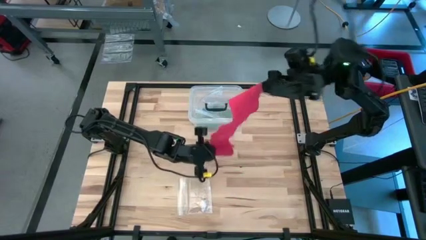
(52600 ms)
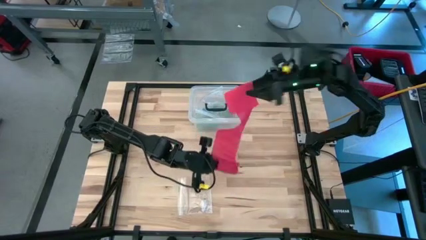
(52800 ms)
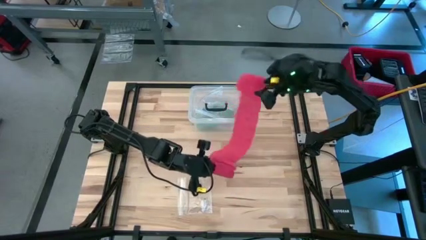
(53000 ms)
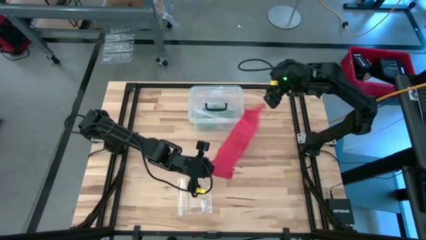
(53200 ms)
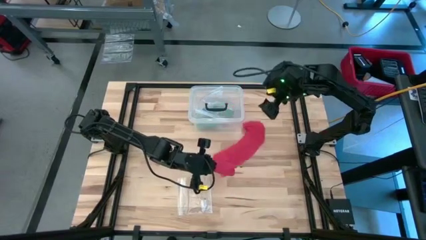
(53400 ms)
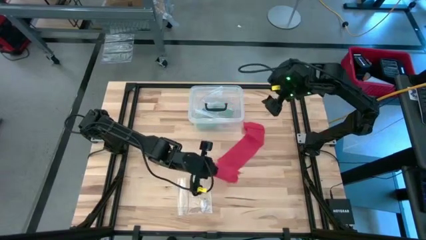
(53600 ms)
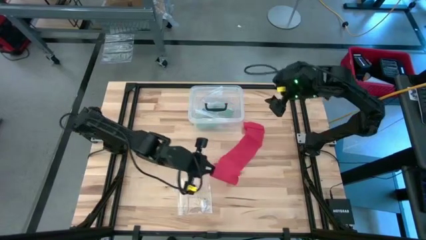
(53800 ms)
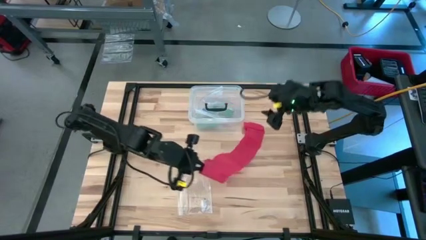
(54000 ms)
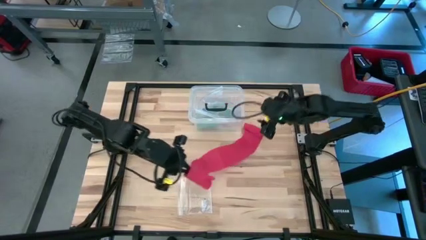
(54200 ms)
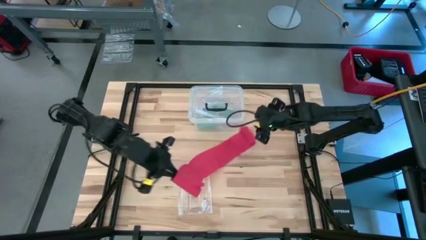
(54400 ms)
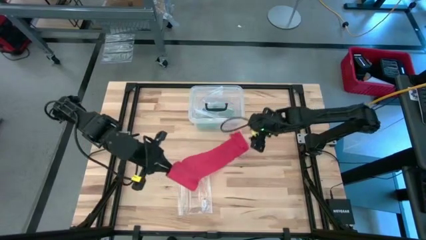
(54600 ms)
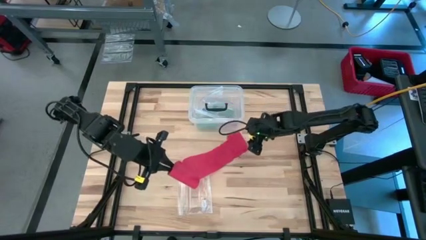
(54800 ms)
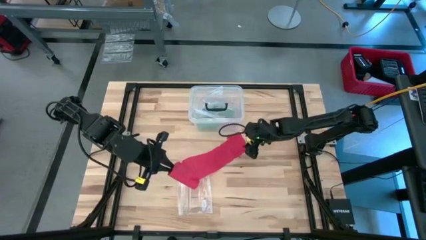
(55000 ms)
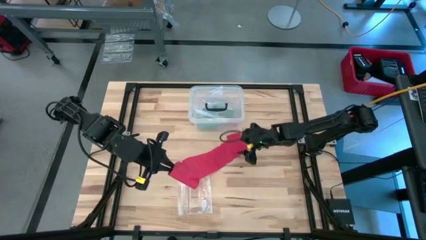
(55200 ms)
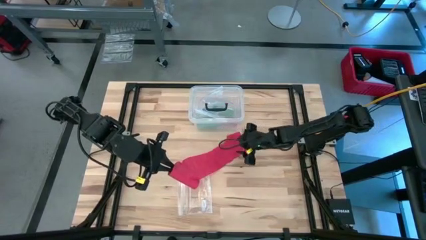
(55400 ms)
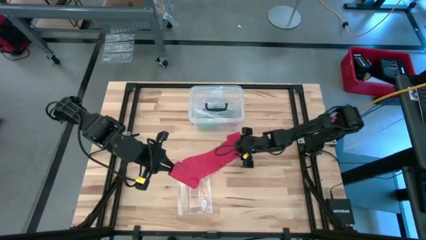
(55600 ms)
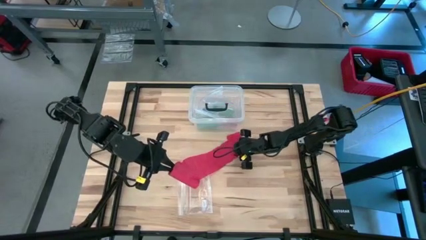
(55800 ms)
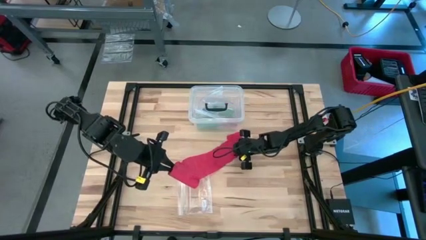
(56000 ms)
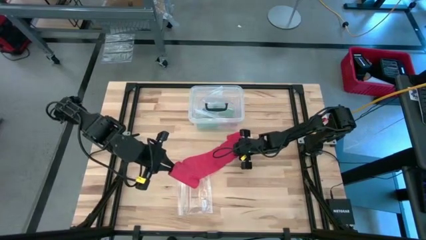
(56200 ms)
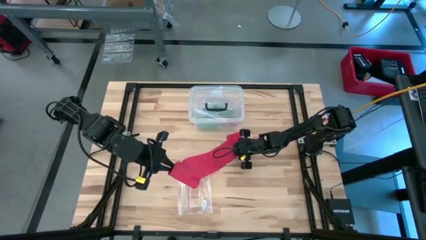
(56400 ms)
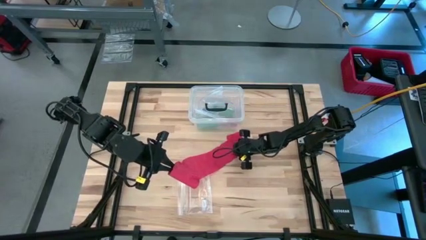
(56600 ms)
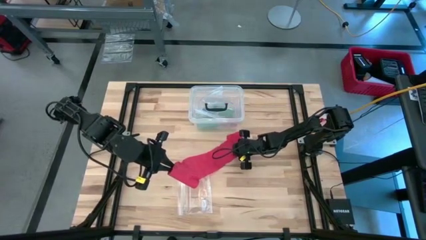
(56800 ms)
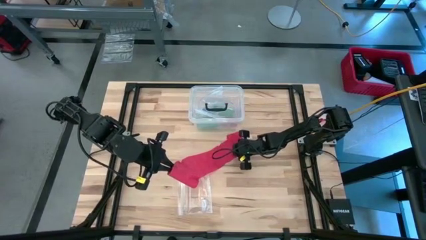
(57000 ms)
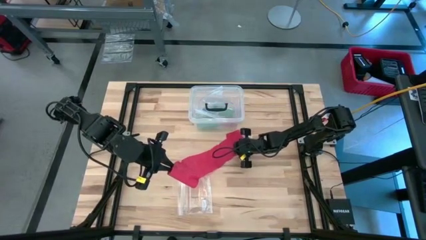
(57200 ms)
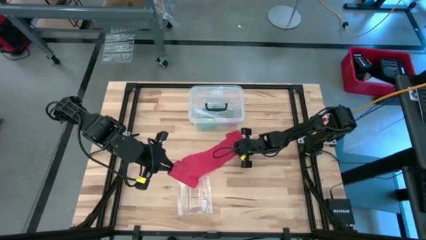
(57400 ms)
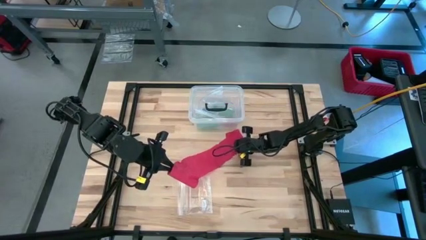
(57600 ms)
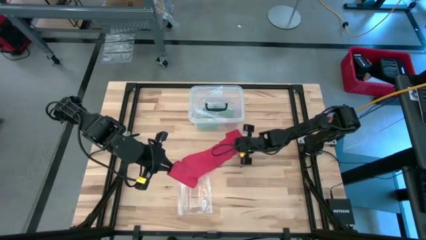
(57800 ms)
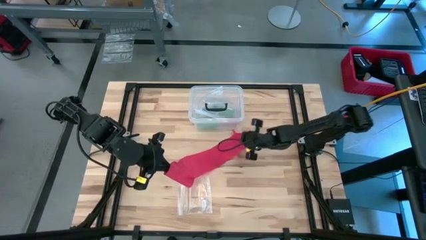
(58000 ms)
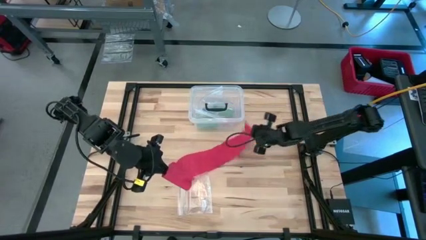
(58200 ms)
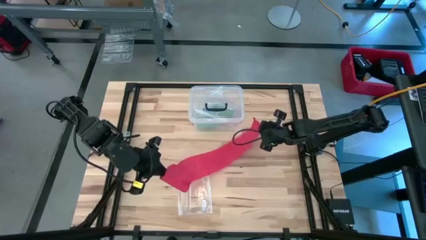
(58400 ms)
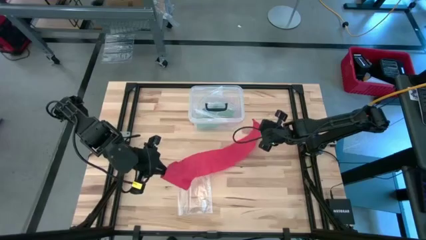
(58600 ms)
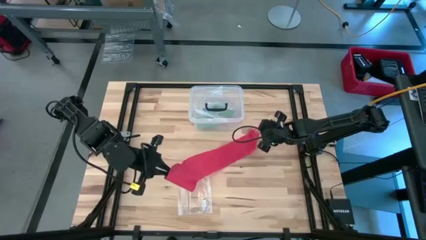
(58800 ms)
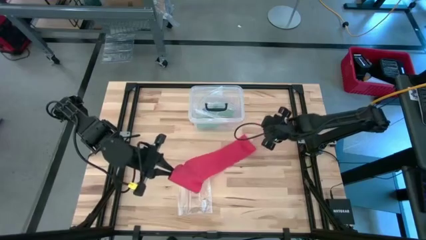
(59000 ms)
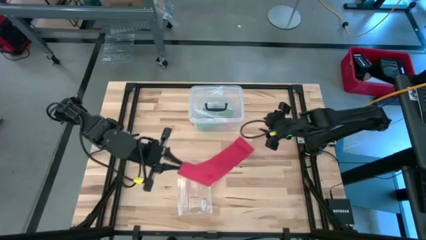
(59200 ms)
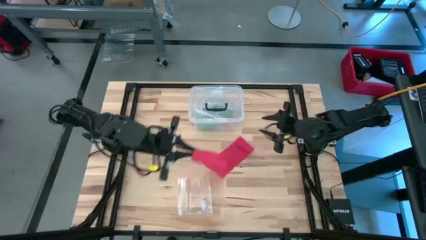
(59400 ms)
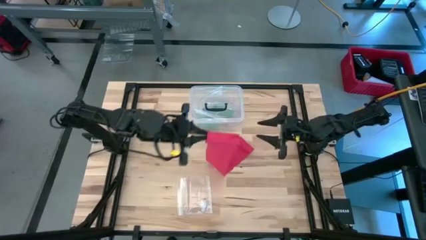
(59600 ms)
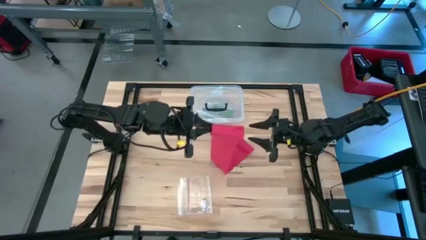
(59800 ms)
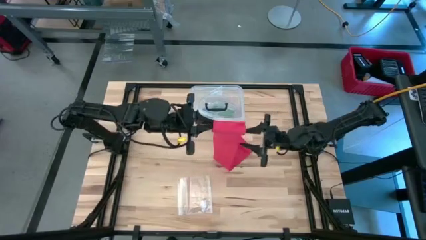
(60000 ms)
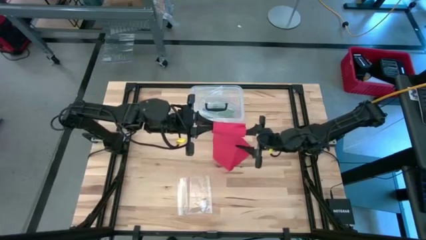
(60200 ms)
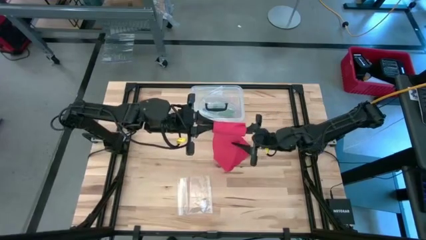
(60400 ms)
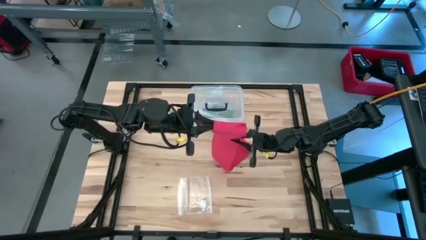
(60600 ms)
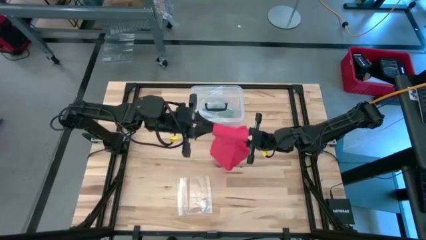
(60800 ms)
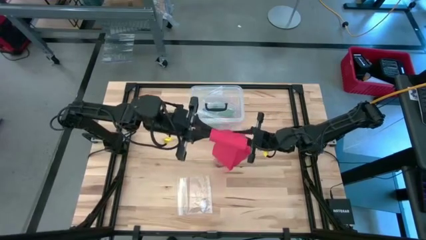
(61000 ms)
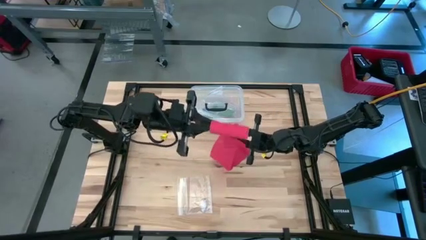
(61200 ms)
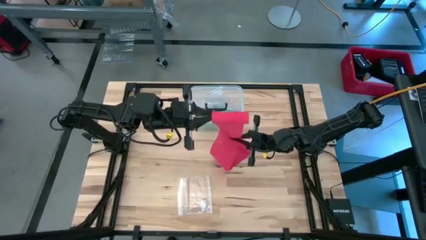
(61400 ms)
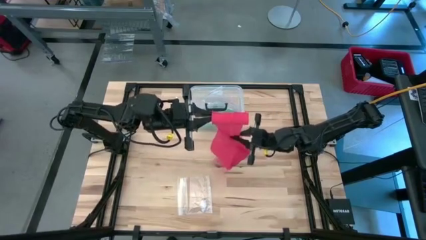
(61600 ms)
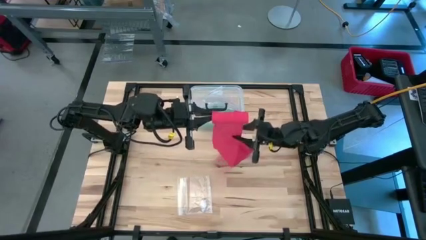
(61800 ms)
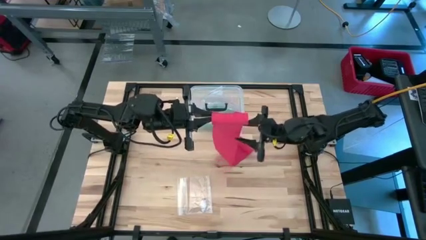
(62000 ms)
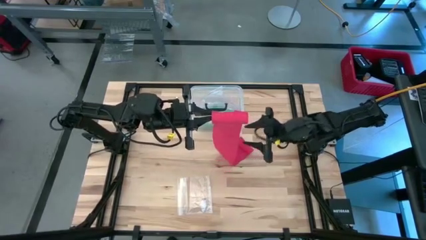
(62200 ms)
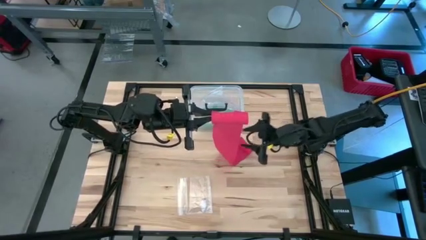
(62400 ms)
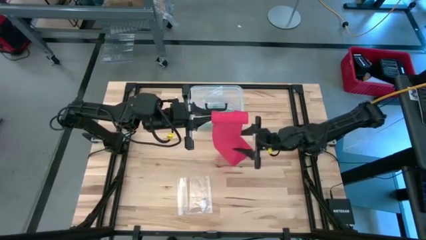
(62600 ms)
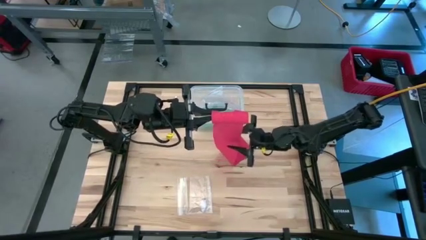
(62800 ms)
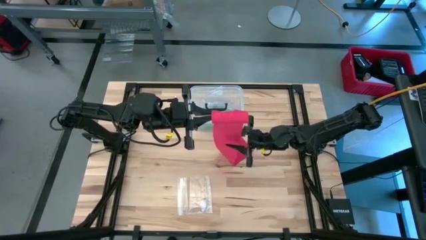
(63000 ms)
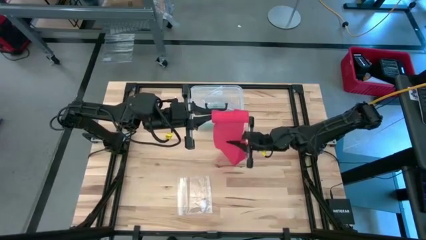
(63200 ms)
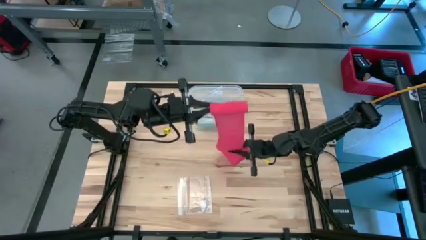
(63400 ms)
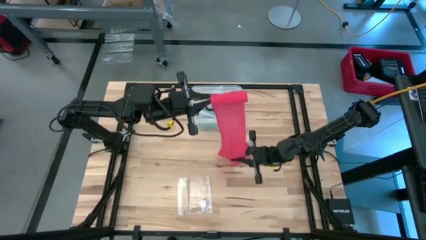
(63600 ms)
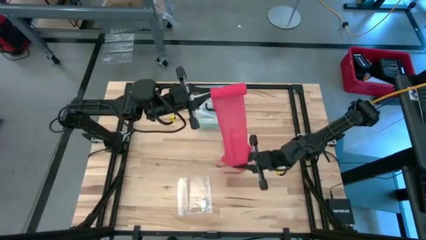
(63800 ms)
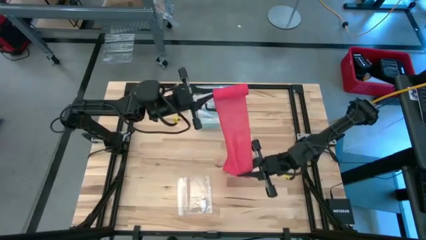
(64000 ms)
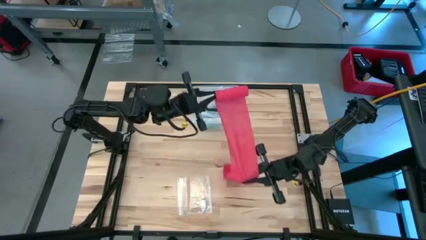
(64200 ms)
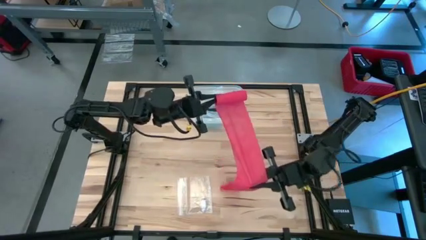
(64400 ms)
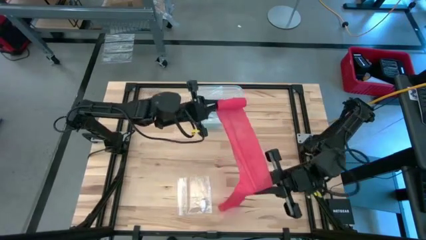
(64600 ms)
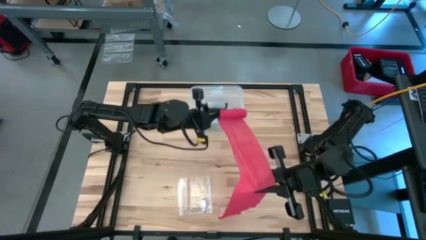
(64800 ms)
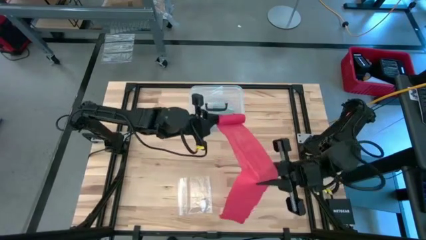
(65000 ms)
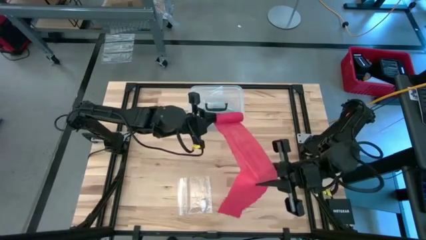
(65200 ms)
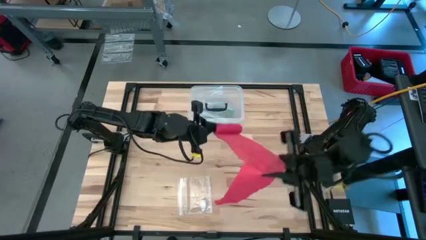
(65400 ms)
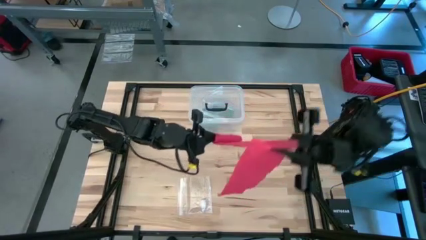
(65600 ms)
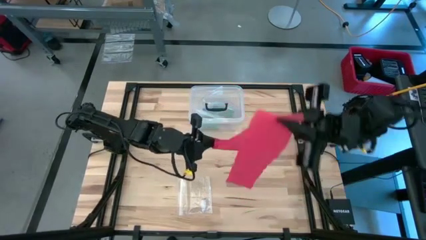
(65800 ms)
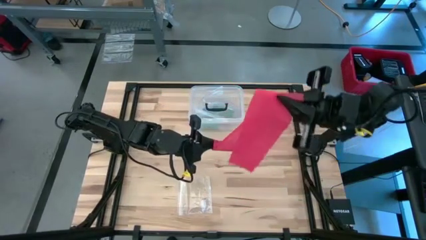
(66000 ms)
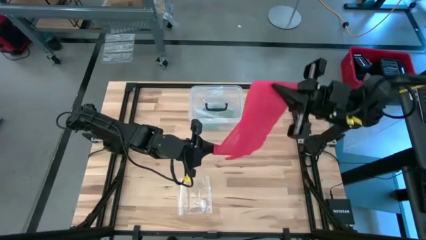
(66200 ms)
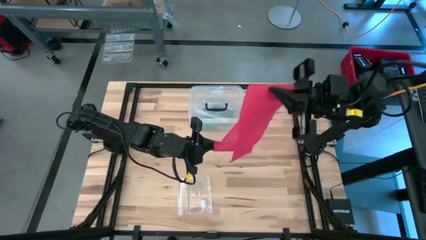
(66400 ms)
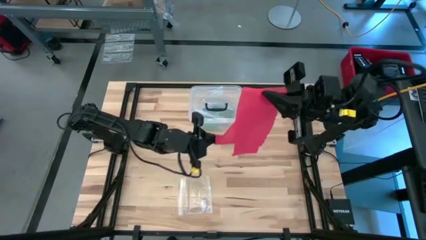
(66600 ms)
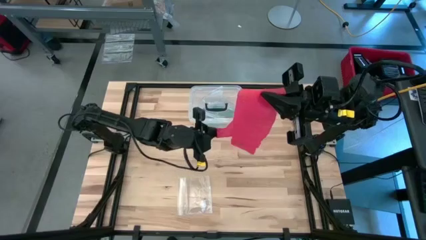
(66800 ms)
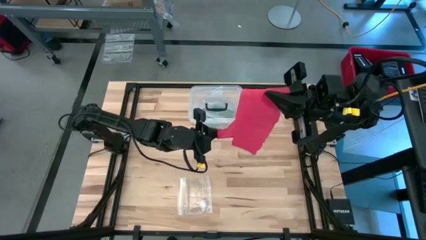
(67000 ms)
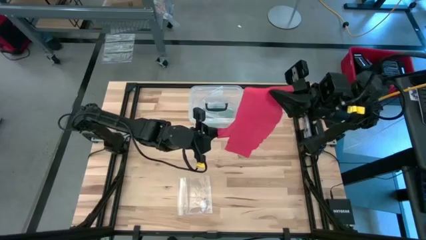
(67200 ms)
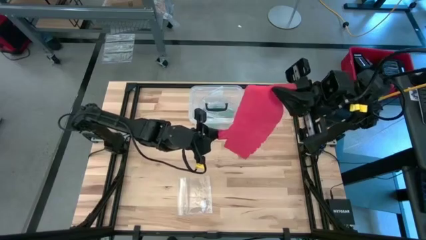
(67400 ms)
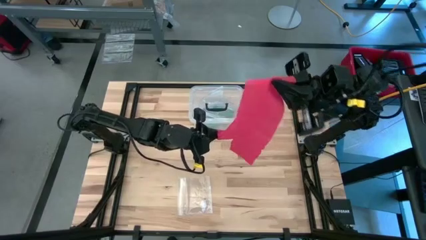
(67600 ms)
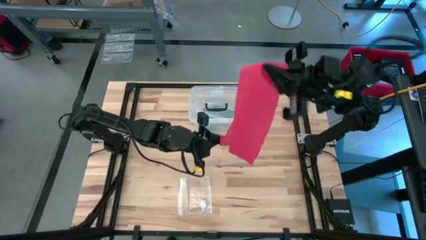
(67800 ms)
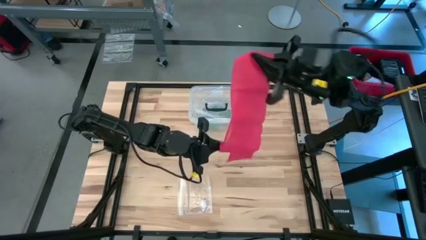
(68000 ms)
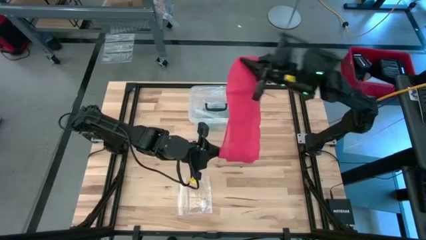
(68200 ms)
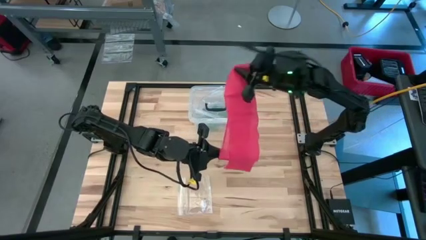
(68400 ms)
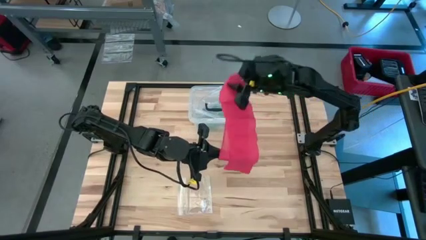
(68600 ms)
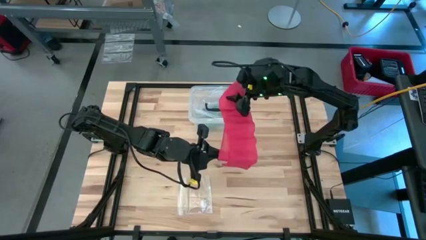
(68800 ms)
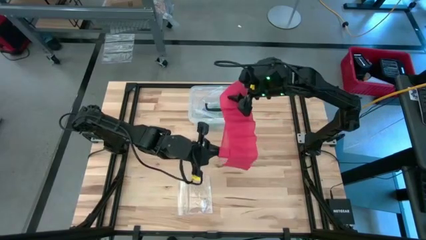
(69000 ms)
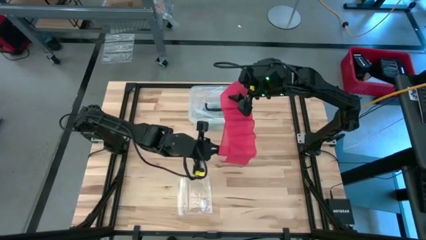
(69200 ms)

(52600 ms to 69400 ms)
Task: Roll bandage
Roll the red bandage
